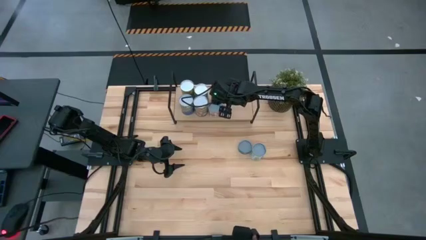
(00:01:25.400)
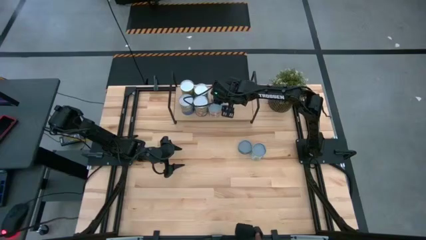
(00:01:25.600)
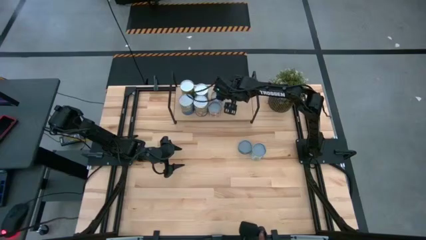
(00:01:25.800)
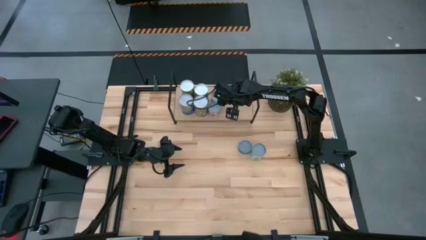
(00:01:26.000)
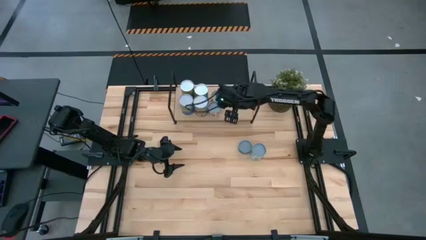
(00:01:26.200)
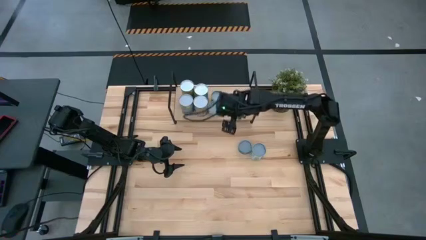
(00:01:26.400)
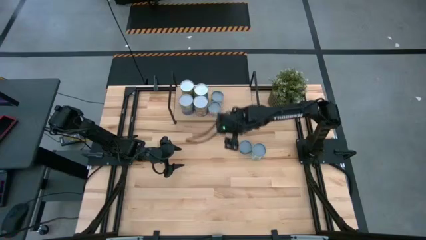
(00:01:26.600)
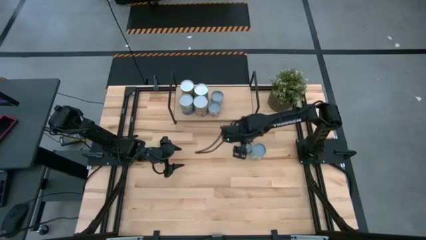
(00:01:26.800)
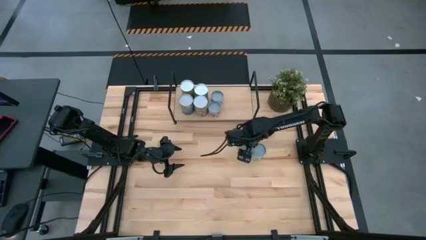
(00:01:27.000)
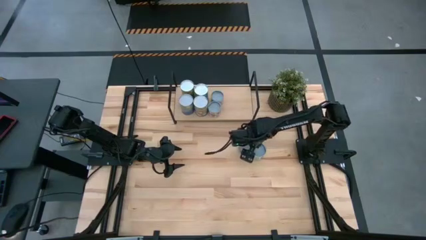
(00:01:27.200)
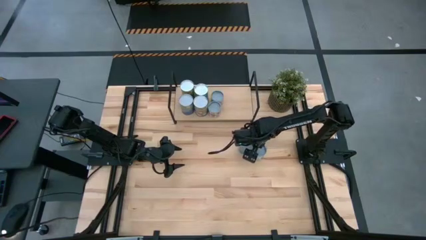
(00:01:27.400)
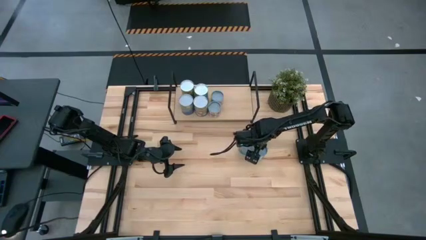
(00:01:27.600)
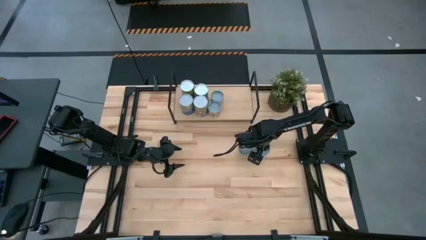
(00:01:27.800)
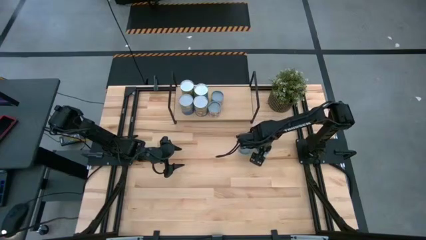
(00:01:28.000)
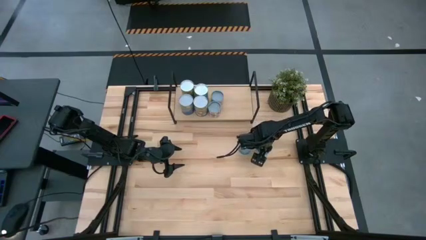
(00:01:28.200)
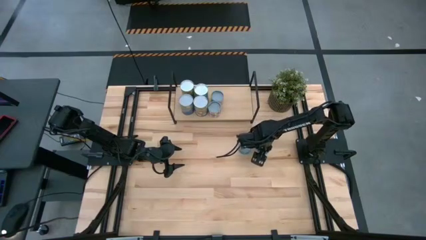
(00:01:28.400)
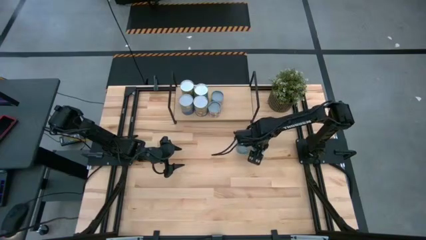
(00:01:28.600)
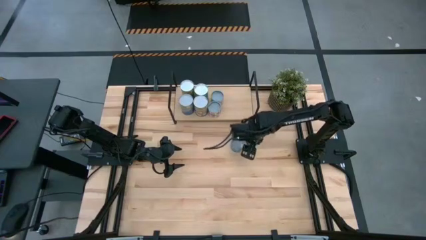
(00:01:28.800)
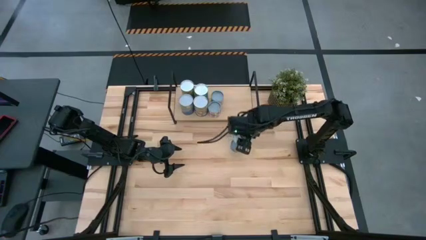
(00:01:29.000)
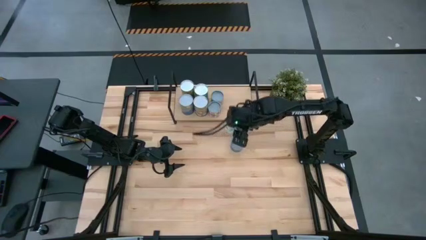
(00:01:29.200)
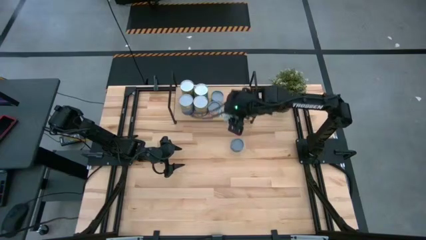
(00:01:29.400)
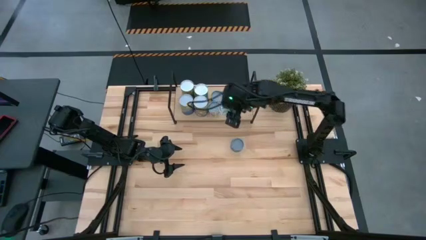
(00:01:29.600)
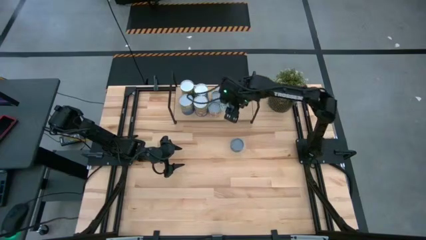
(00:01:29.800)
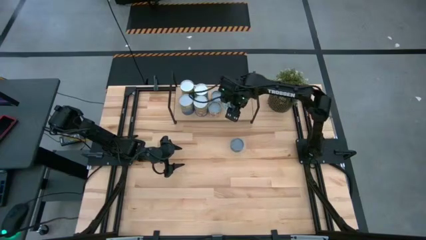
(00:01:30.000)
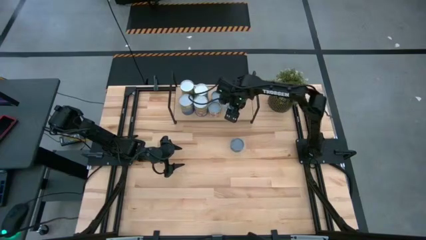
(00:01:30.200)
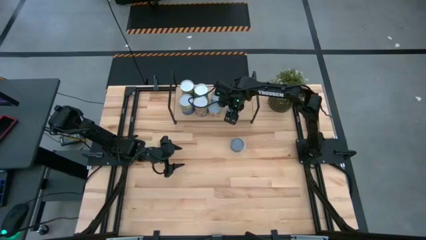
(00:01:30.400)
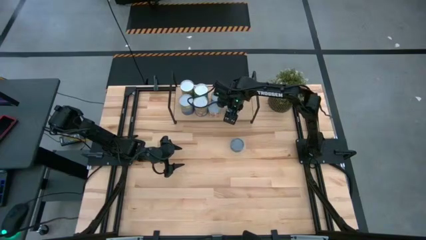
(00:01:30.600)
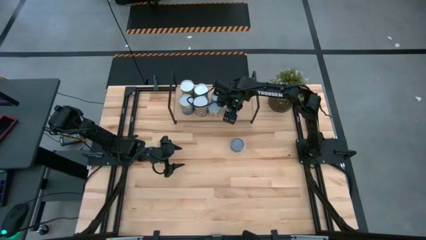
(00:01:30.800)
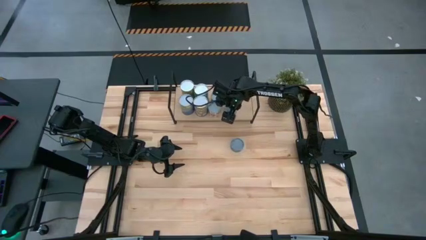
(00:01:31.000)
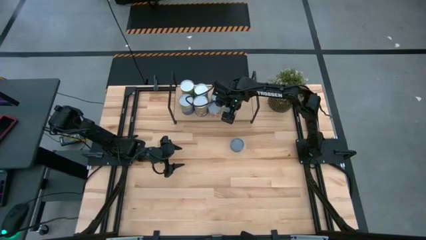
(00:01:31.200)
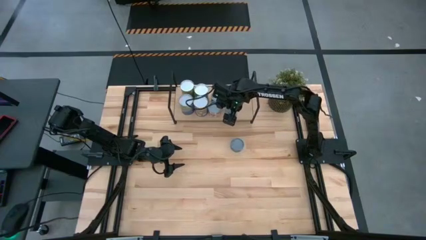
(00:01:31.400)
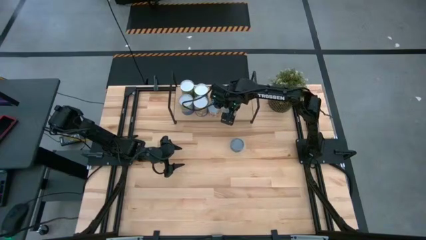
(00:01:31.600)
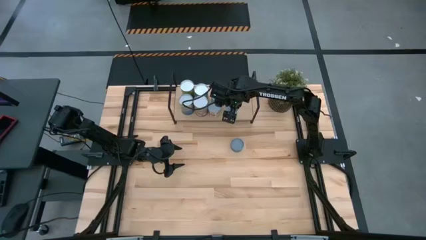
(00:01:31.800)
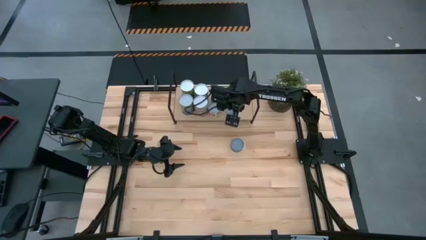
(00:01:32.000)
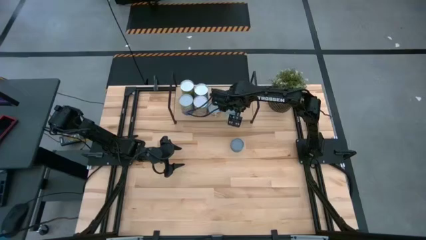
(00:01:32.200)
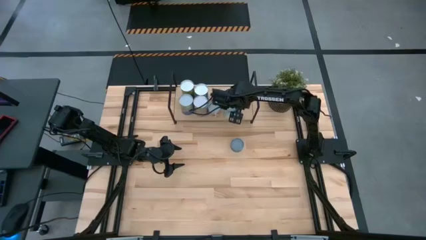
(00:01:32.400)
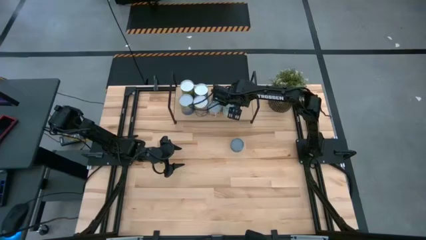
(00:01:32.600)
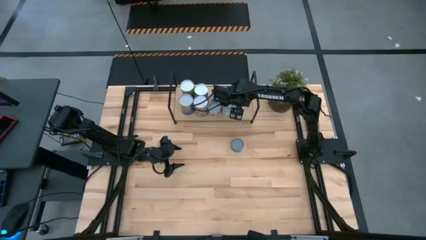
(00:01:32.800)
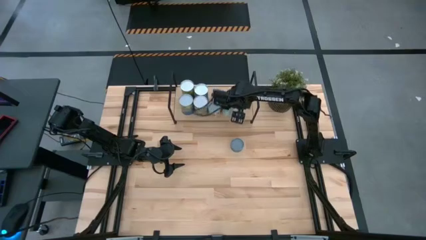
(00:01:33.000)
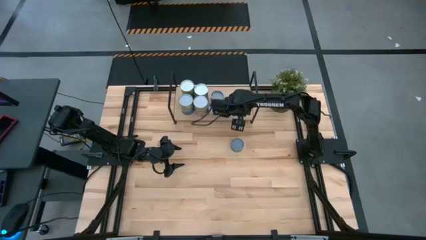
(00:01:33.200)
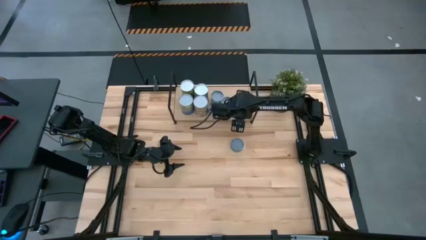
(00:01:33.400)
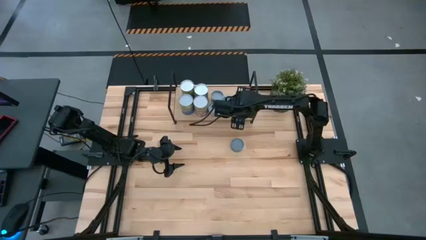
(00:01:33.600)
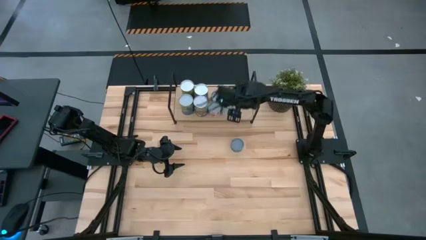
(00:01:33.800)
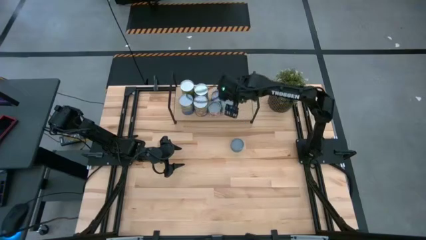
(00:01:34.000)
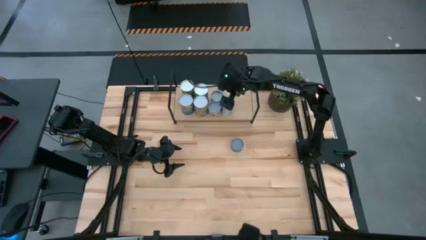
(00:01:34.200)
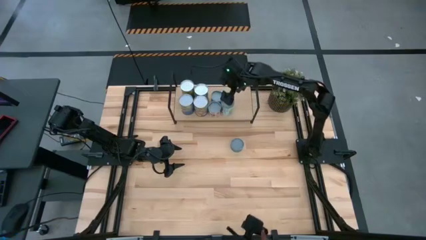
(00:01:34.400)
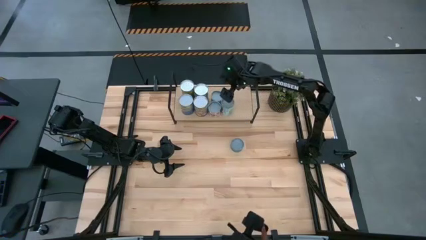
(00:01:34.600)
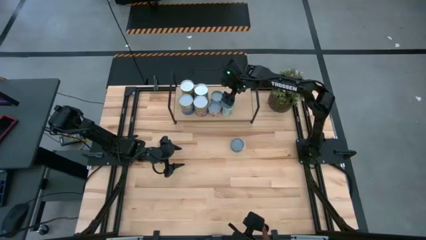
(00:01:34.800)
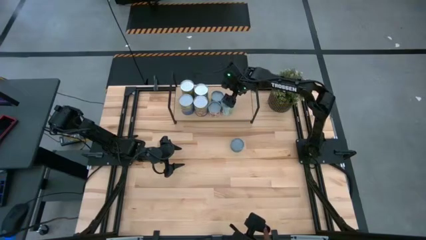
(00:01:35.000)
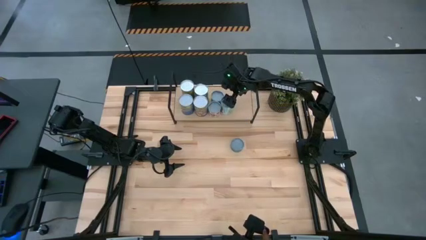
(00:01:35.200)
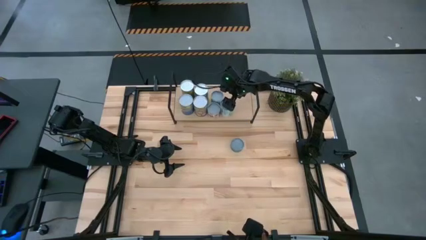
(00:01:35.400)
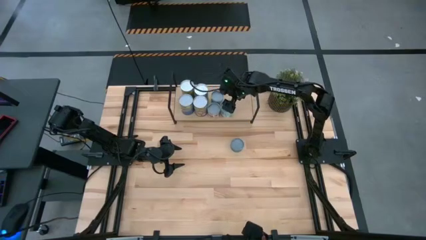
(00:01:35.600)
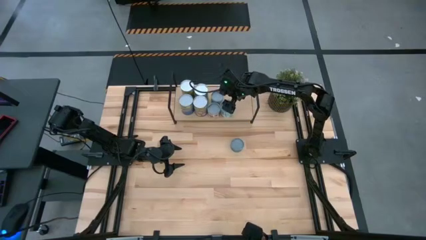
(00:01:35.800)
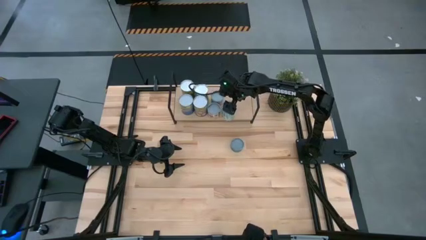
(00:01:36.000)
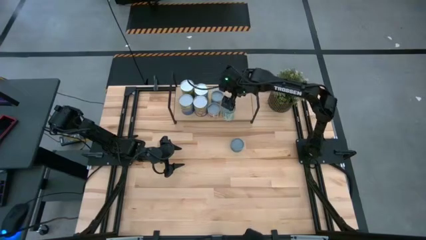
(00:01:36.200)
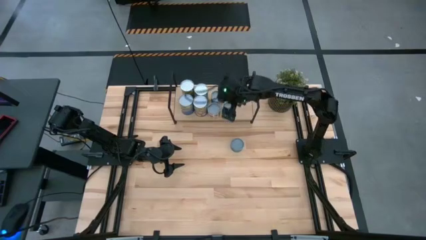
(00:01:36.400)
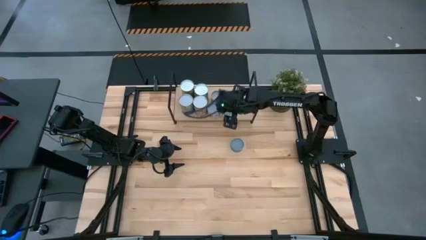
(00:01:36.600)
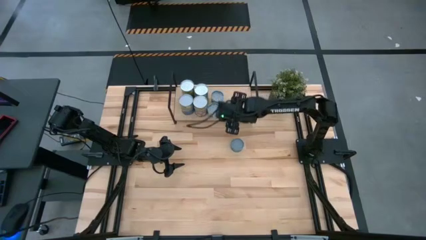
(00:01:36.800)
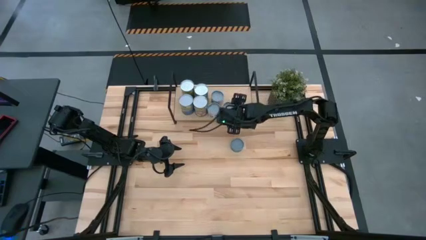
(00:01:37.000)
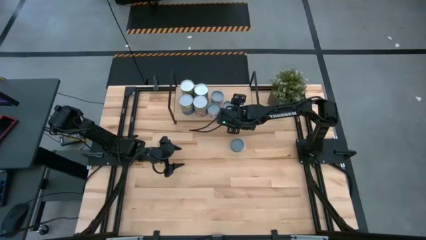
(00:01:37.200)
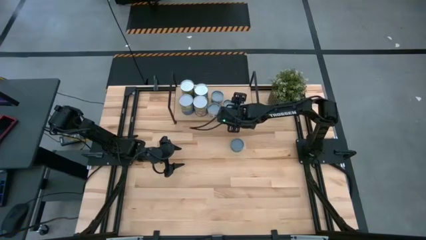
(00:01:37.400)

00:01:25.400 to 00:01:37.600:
Task: Pick and place cans onto a shelf
Put the canned mixed vegetables onto the shelf

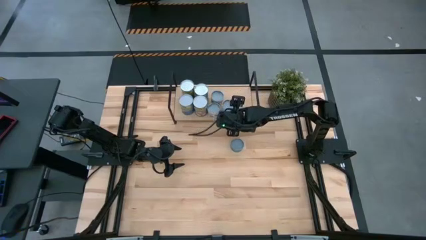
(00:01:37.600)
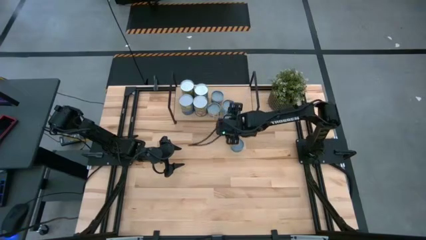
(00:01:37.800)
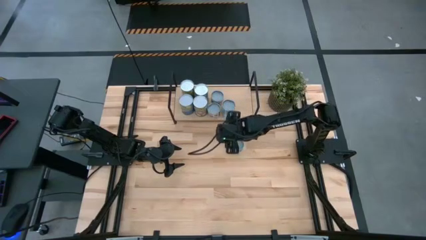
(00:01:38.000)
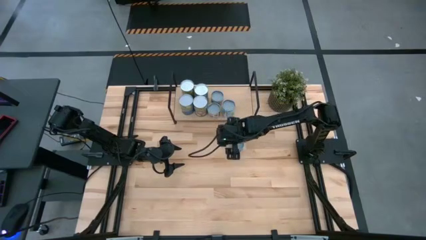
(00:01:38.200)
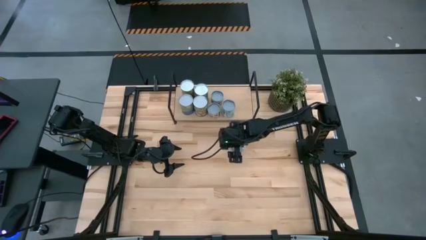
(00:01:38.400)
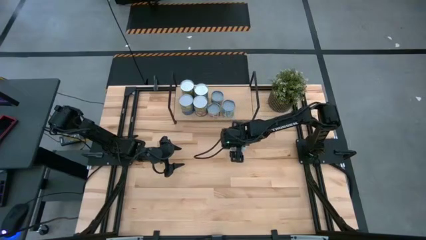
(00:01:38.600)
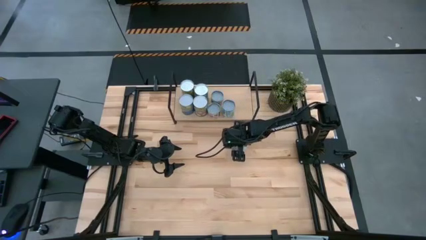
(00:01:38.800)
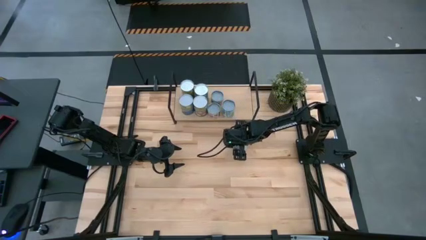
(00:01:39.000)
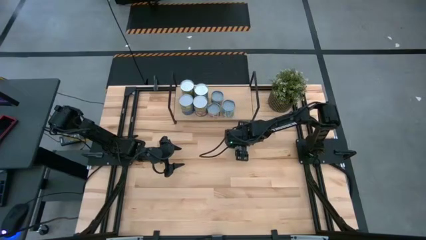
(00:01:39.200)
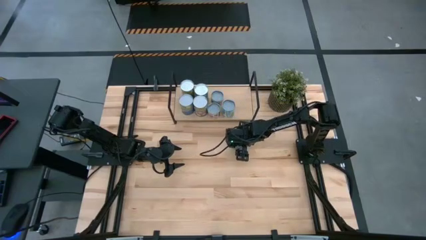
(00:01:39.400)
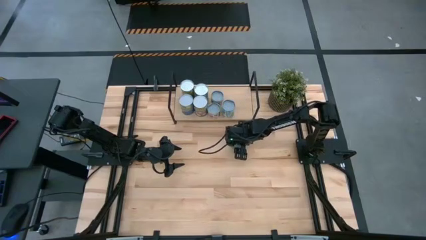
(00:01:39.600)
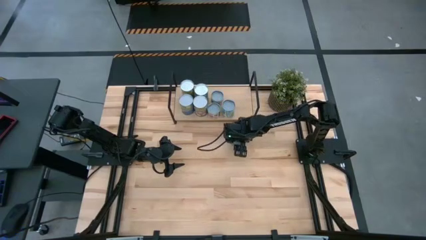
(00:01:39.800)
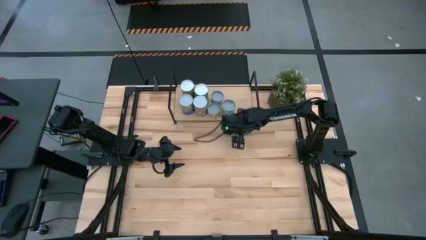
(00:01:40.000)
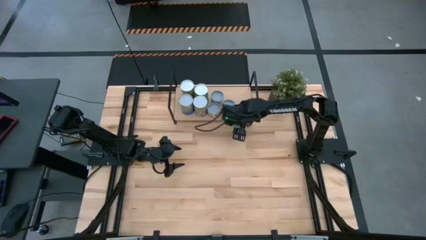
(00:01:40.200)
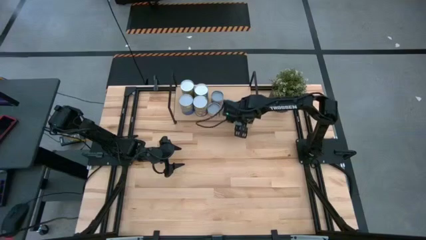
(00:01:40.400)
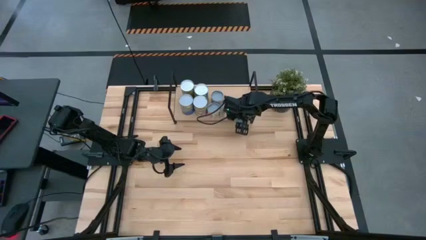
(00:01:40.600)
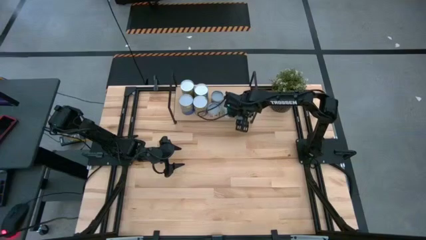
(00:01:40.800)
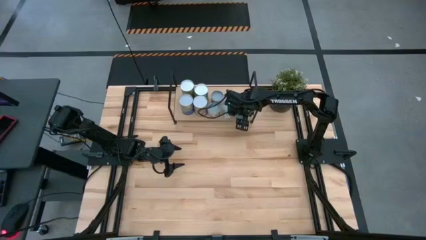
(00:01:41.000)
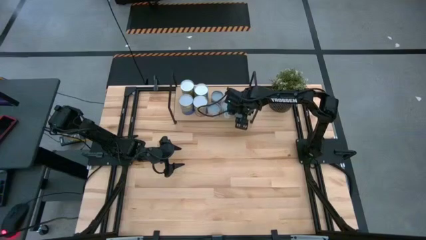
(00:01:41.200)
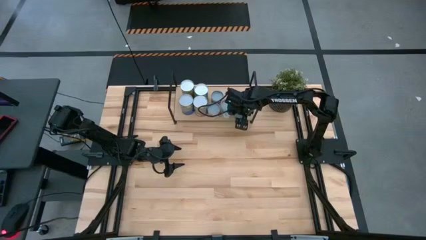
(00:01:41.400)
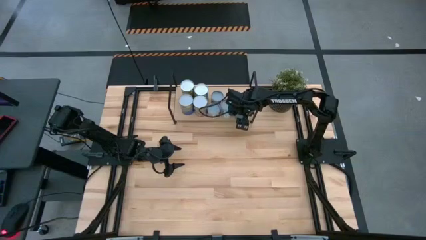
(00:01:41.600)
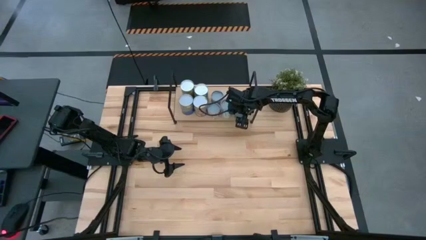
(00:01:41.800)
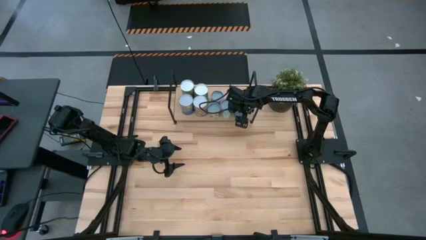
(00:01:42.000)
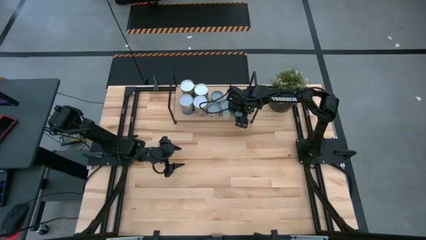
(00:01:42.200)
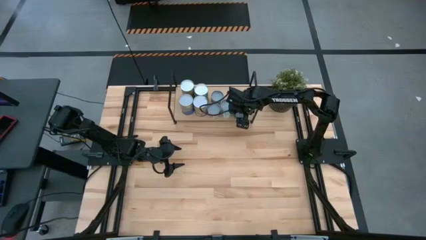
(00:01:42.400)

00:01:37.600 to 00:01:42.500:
Put the canned tuna on the shelf
